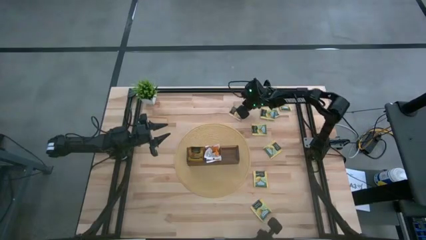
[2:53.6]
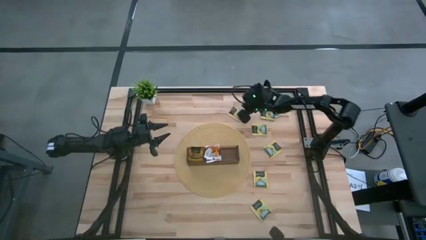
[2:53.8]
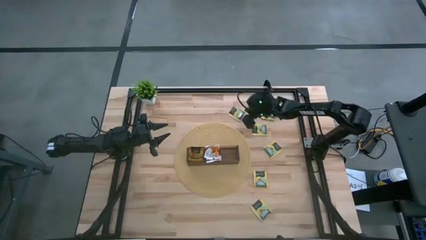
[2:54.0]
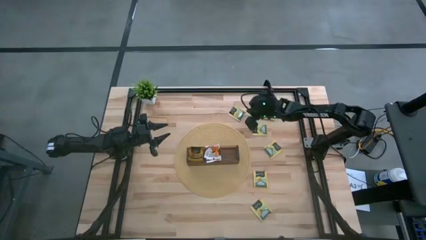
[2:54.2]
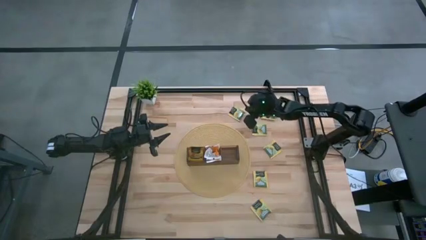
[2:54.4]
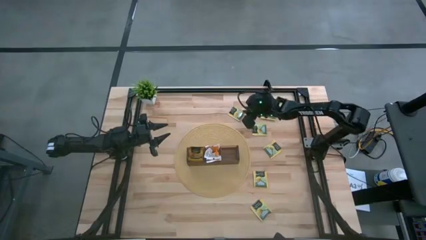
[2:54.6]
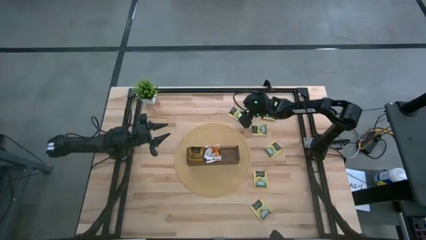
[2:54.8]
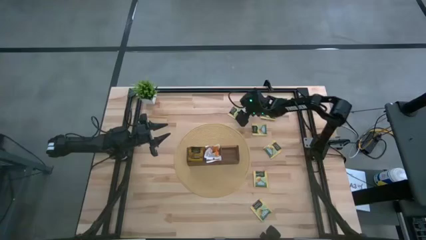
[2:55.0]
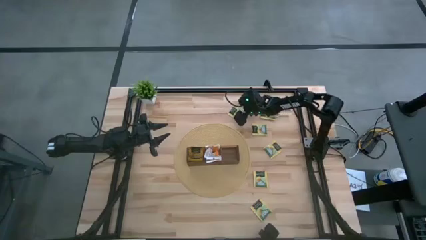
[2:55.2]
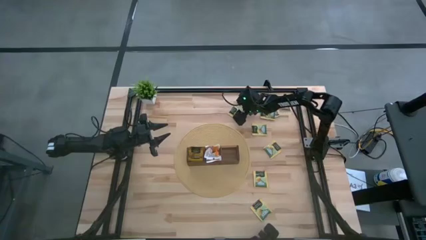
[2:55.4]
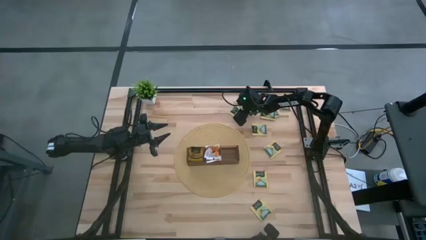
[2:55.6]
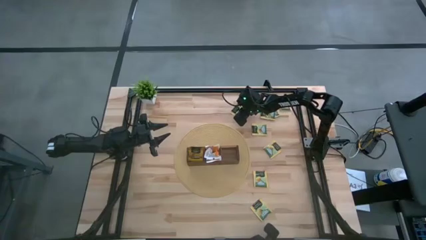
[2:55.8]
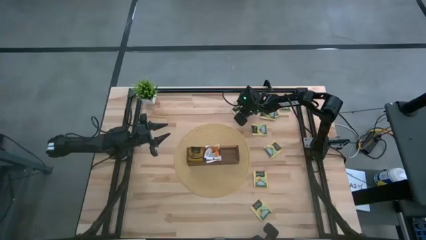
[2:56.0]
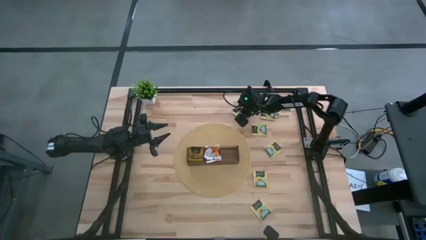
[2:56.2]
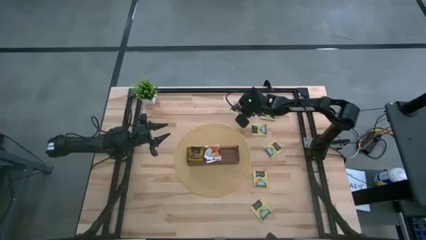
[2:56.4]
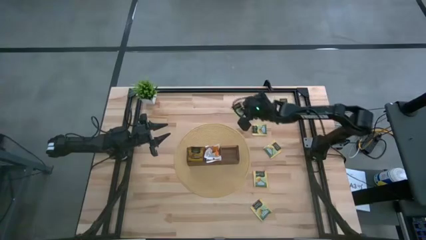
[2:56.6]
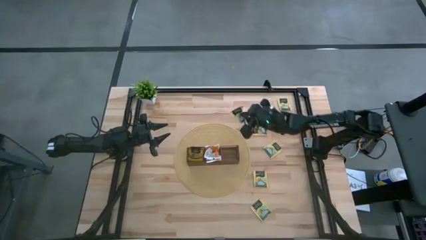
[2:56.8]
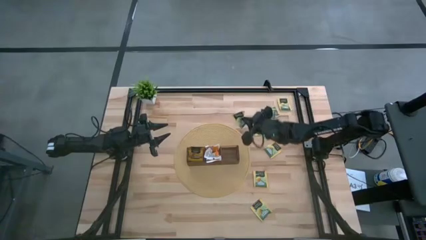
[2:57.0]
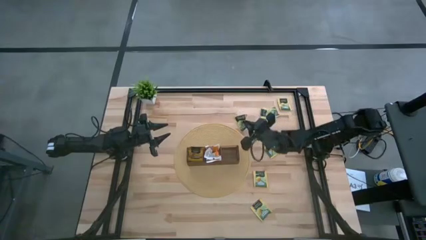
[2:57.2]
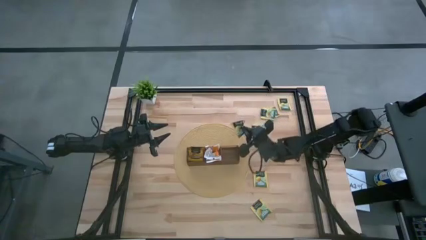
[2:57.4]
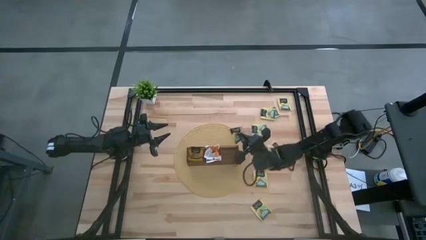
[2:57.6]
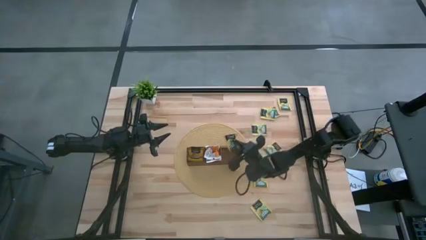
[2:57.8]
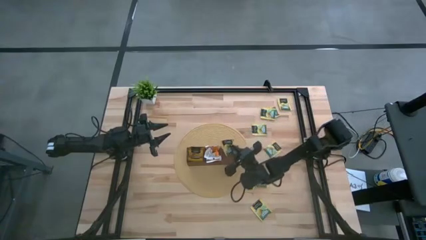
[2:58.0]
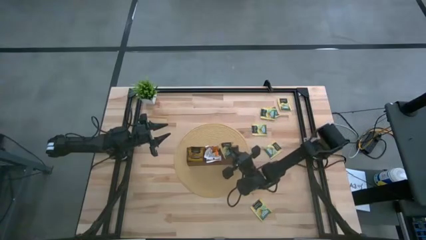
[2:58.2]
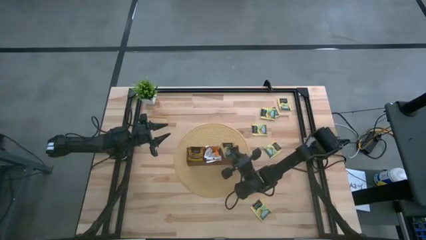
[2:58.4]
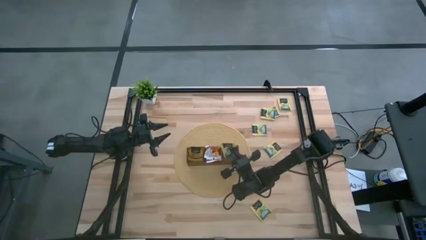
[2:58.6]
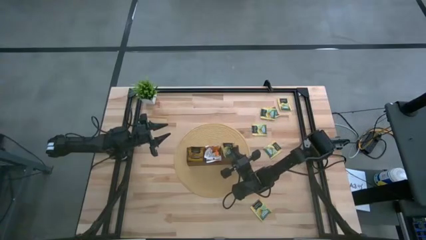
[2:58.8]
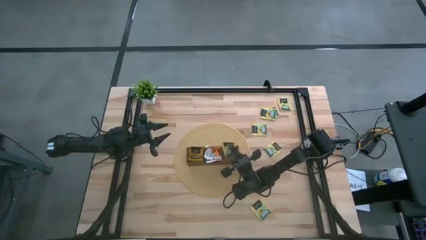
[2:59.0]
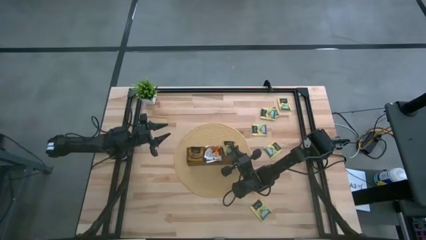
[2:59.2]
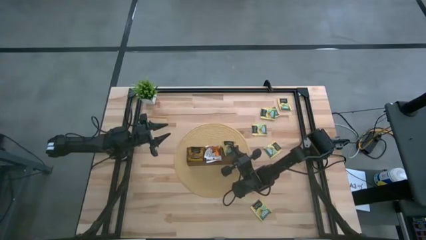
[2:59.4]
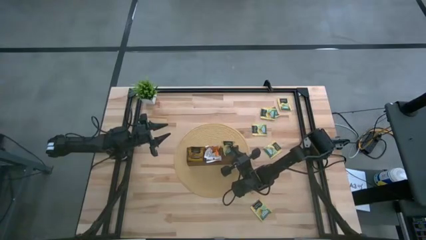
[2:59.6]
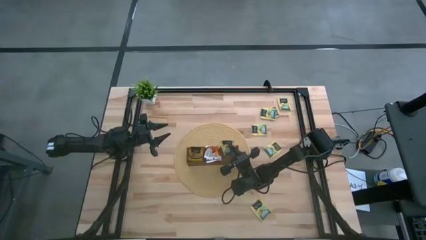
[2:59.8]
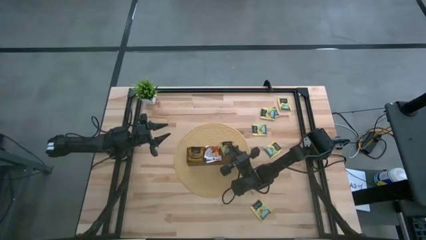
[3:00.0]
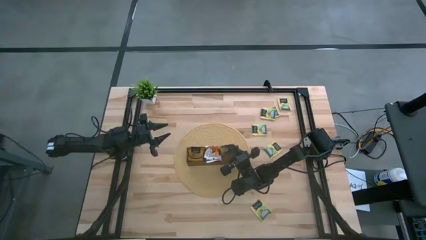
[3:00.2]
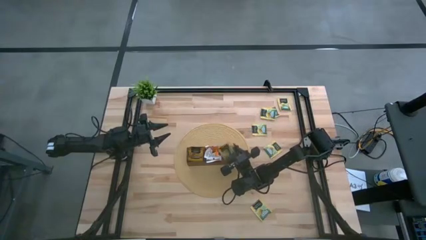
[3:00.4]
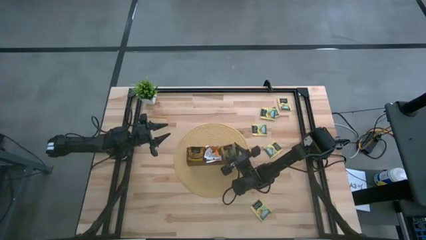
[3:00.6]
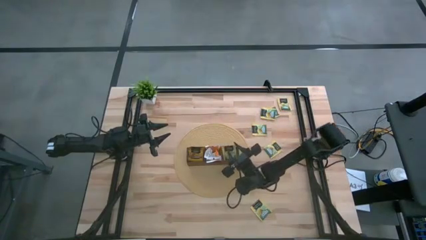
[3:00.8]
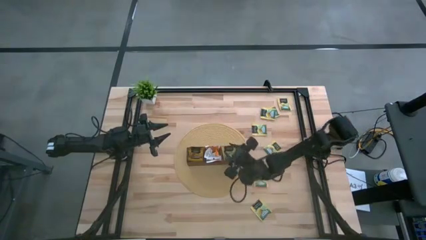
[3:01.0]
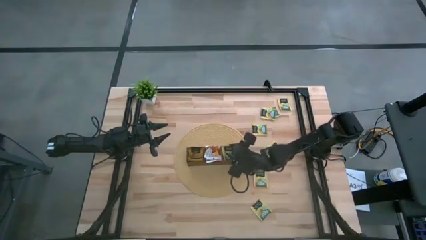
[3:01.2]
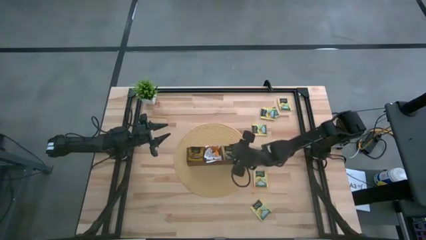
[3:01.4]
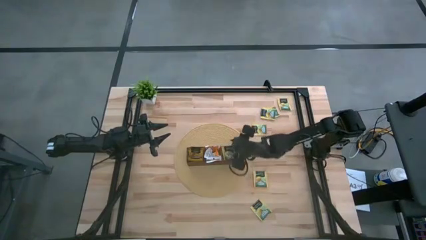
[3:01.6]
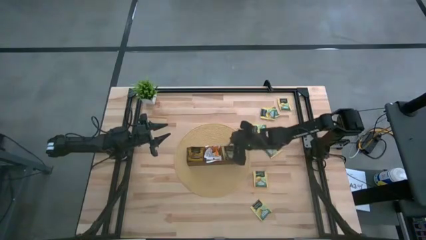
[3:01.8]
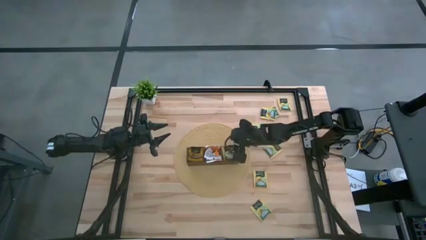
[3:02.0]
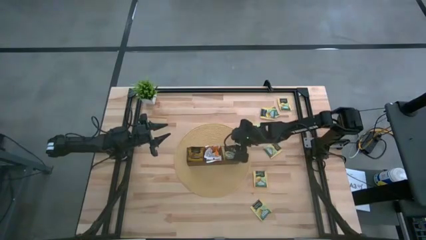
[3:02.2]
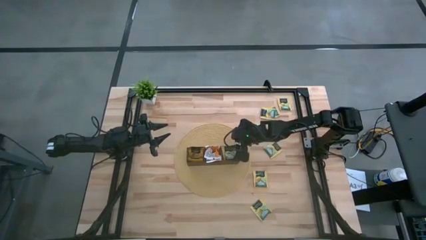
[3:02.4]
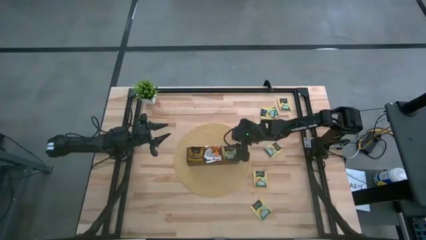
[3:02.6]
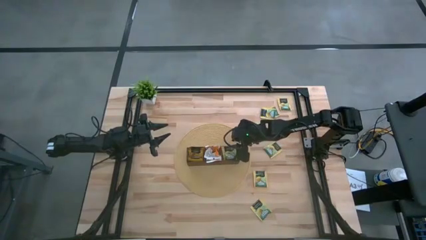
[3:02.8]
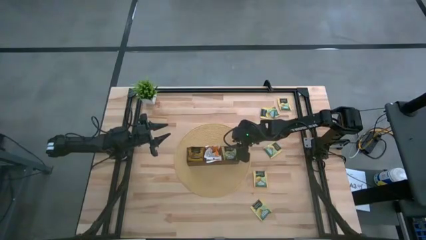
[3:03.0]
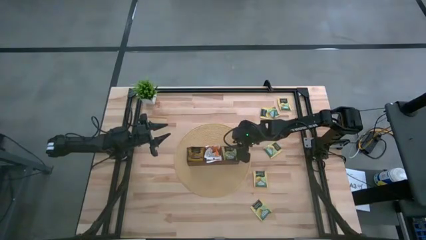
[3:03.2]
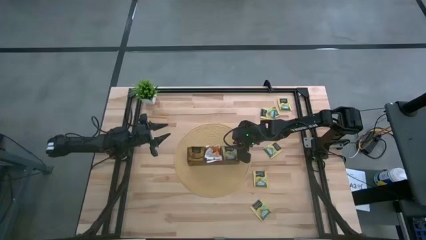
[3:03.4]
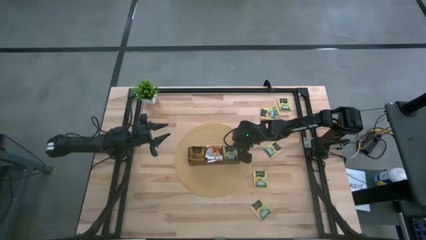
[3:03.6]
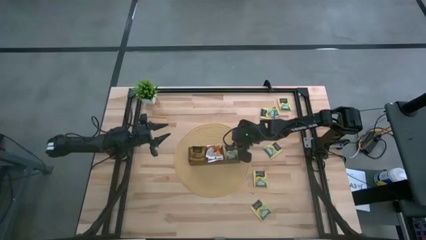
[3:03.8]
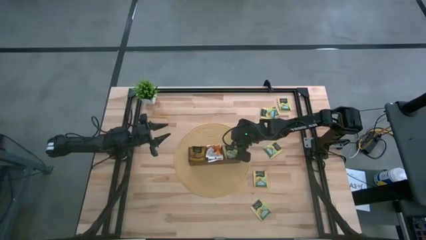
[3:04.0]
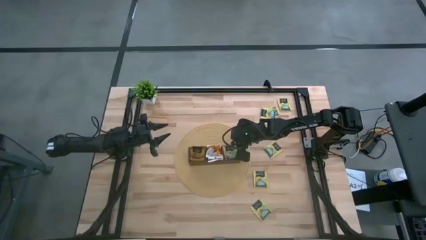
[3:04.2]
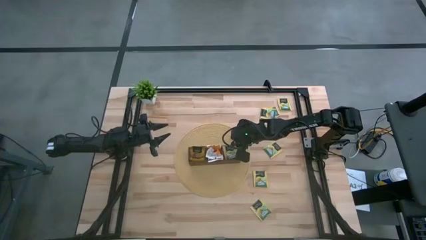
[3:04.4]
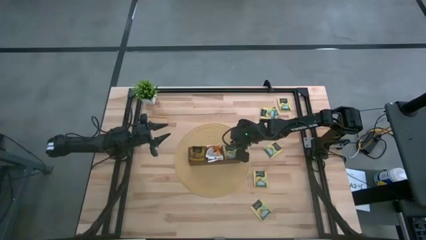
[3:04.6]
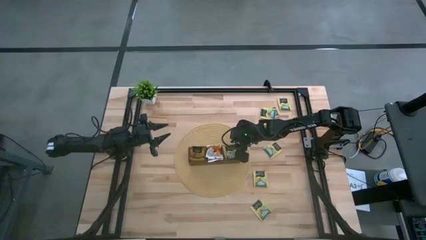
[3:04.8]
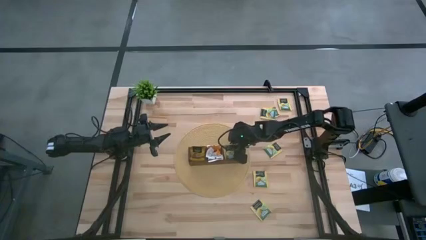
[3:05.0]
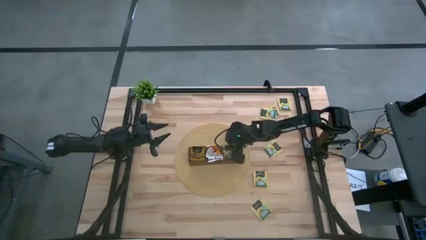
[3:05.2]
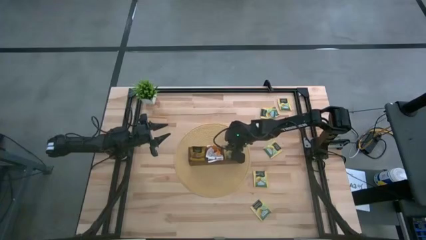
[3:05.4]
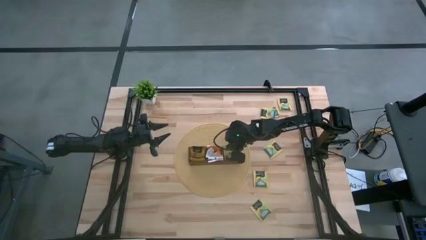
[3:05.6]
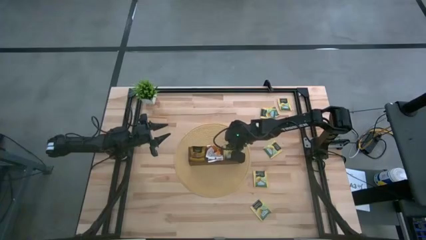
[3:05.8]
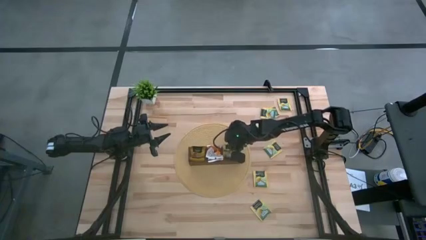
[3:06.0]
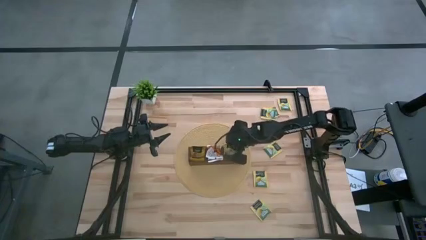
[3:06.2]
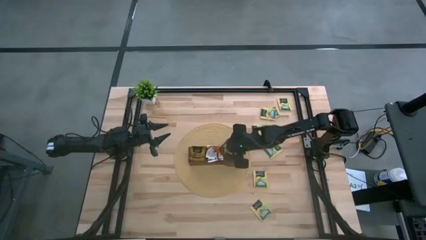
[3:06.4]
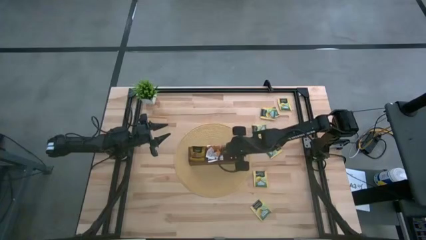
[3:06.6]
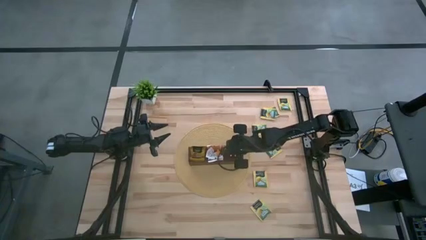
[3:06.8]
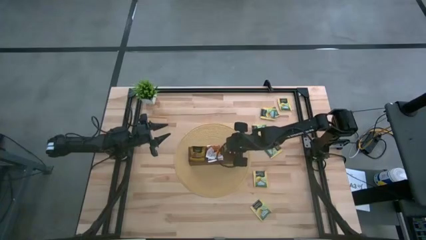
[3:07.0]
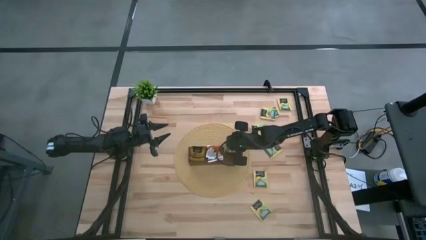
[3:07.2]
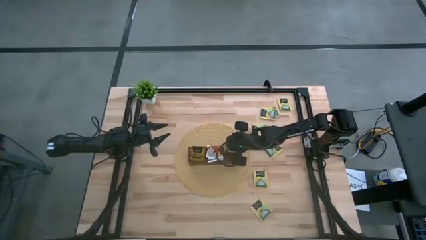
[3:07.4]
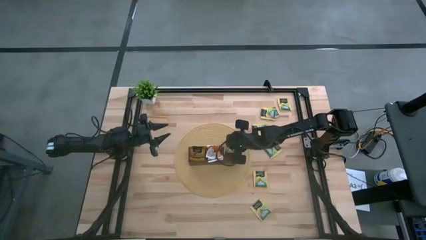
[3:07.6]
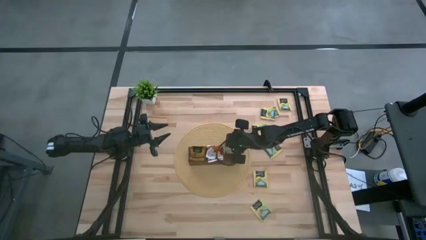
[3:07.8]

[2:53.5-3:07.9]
Task: Pick & Place Tea
Put the lemon tea sachet into the right section of the wooden organizer
